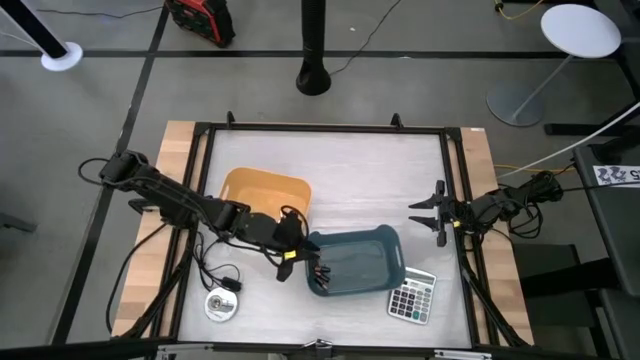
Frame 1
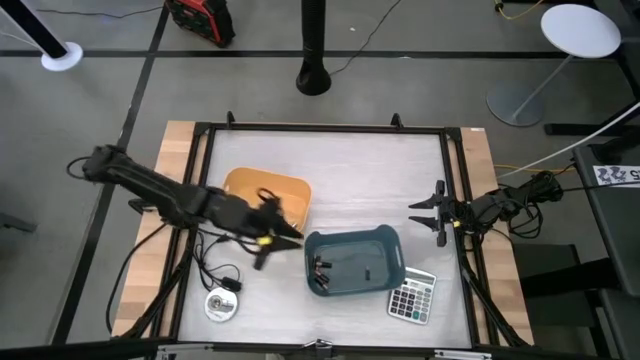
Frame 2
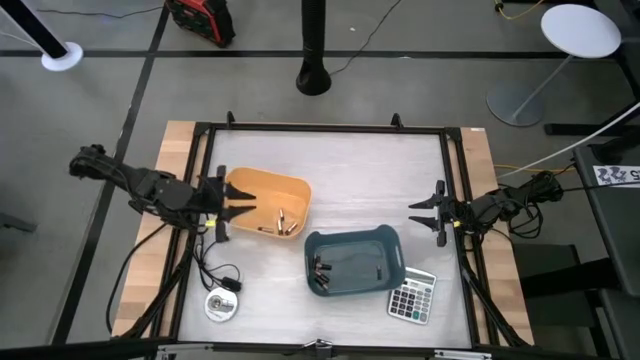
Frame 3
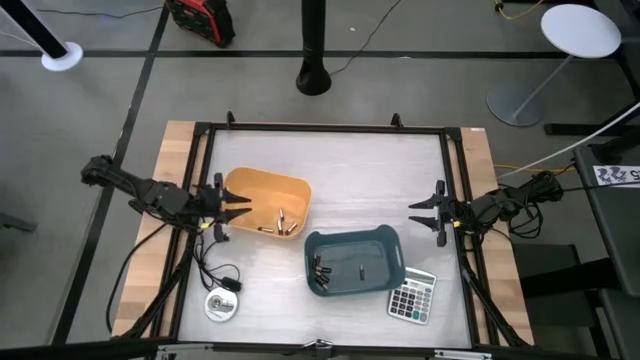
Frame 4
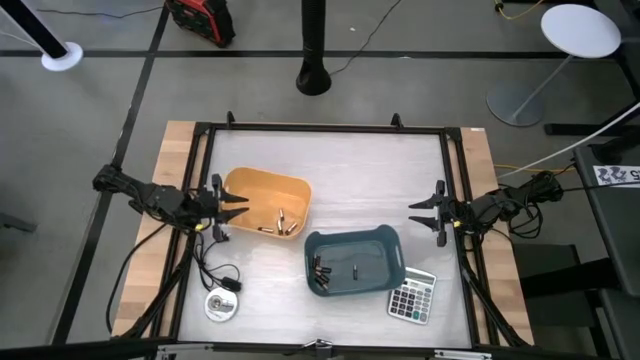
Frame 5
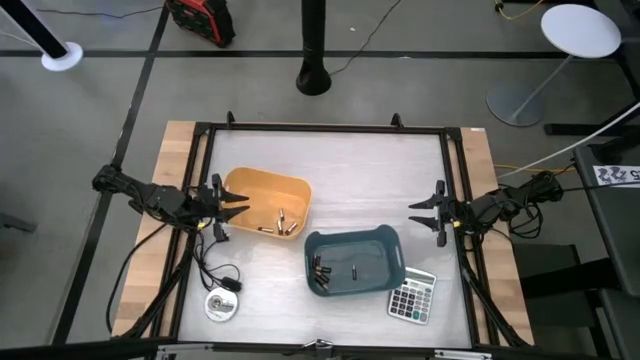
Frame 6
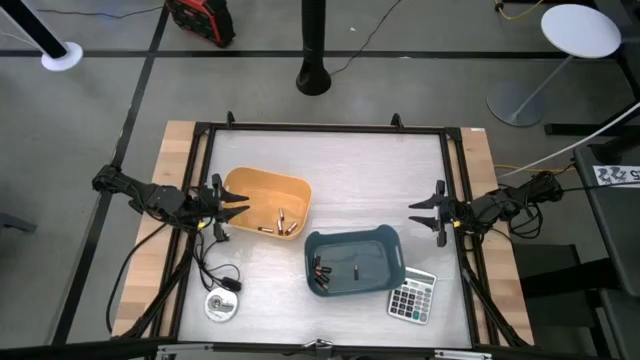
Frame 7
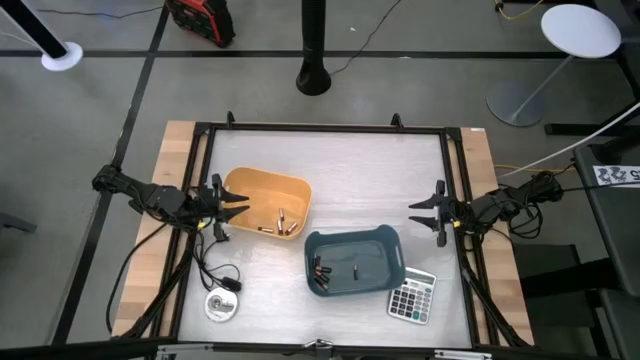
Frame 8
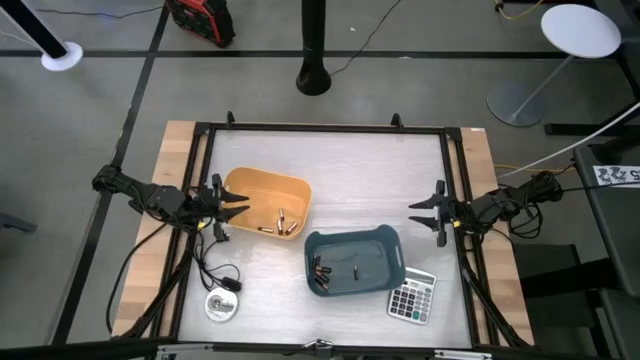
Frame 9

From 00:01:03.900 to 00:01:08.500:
Task: Sort batteries
Return to Home Position

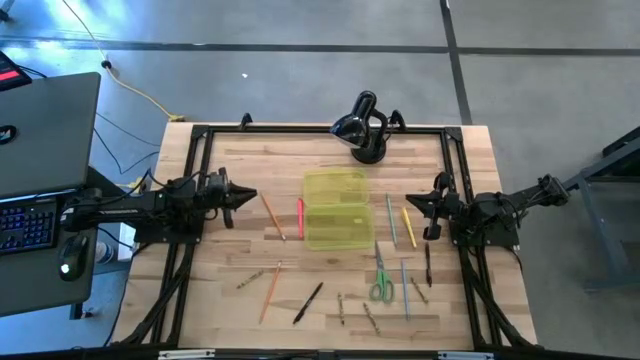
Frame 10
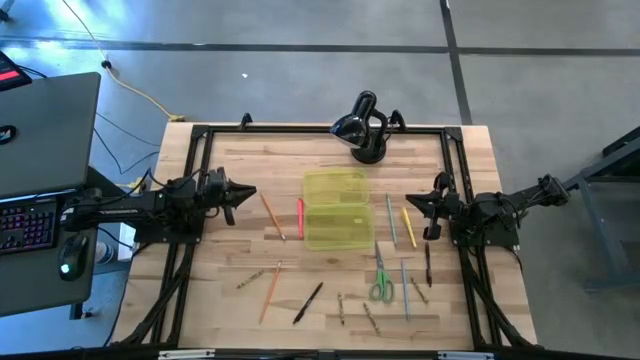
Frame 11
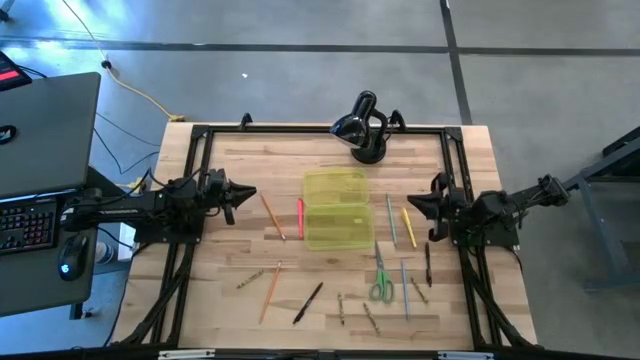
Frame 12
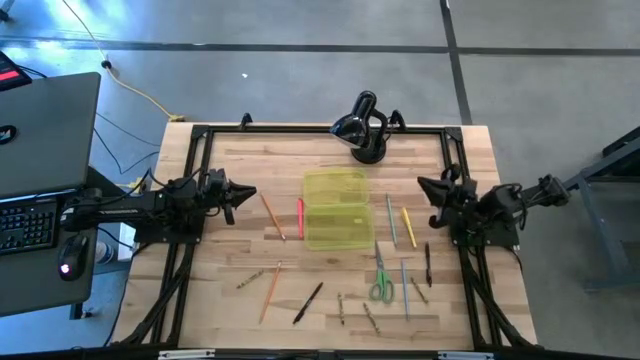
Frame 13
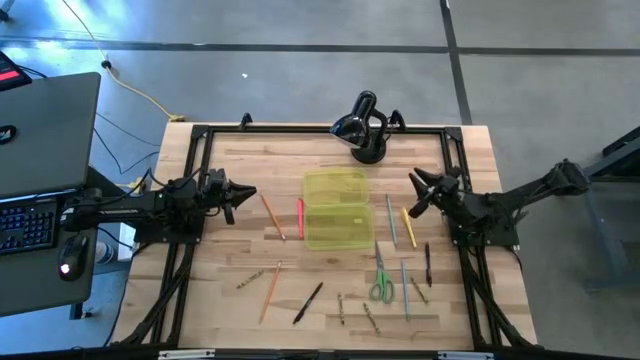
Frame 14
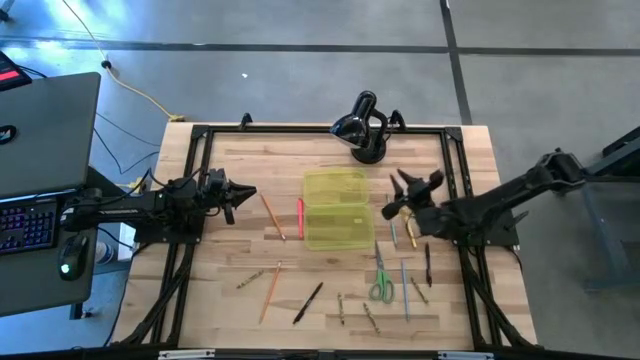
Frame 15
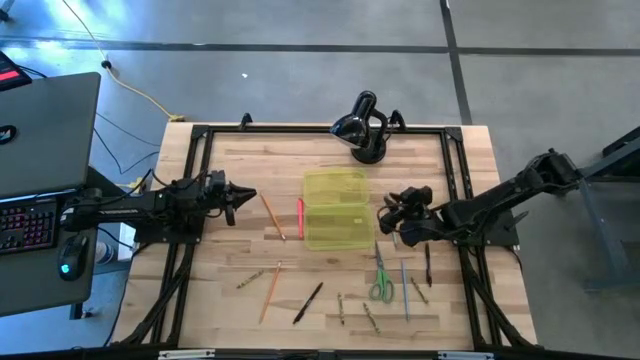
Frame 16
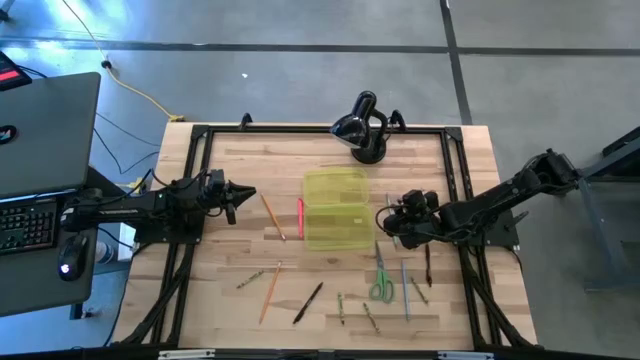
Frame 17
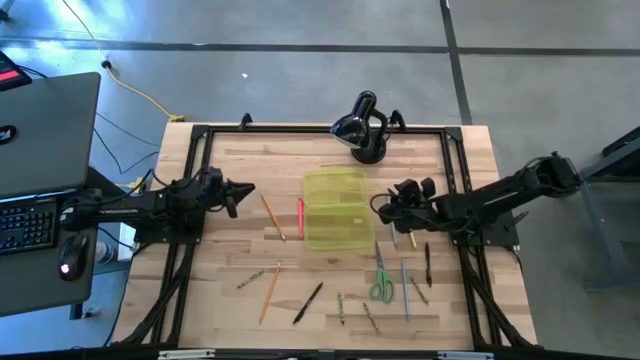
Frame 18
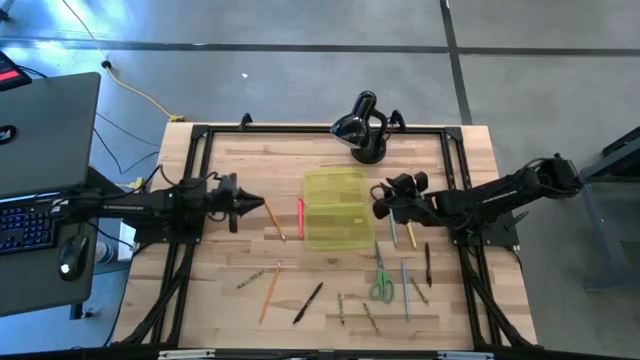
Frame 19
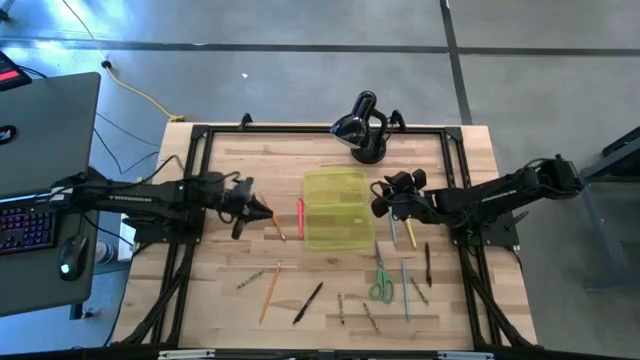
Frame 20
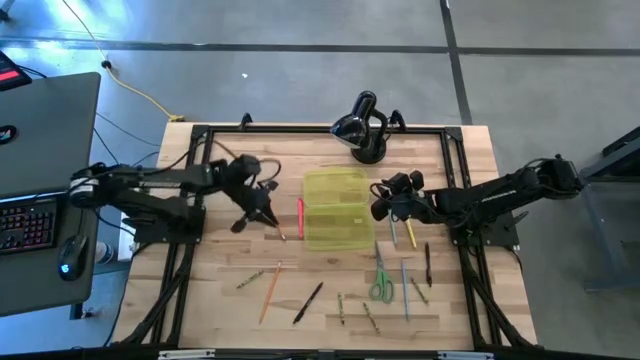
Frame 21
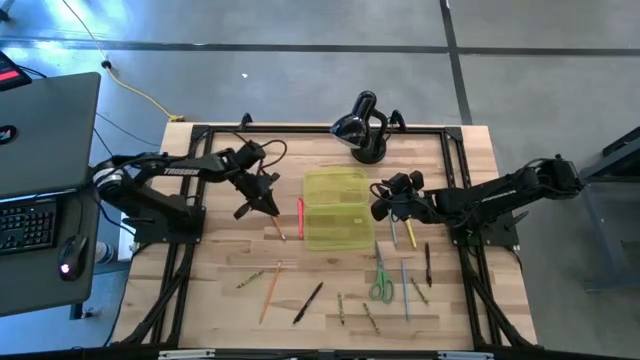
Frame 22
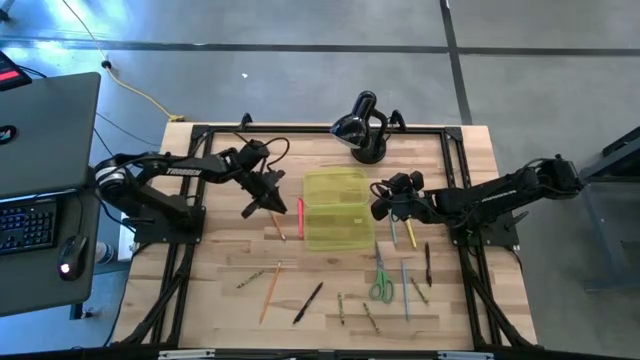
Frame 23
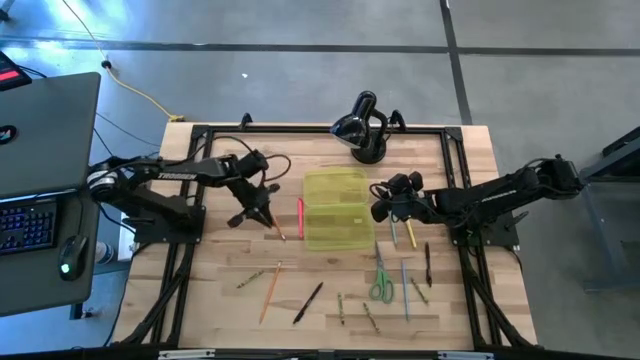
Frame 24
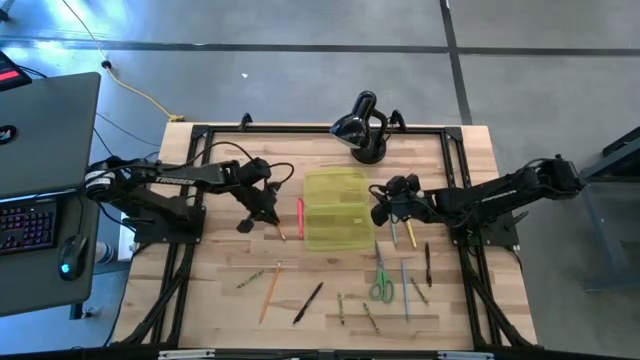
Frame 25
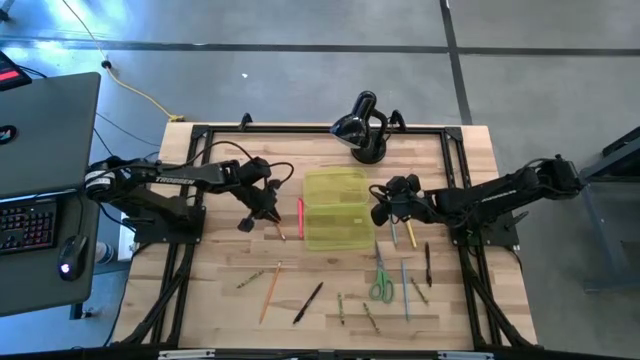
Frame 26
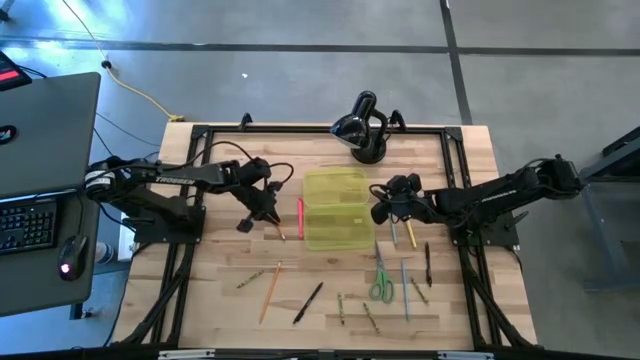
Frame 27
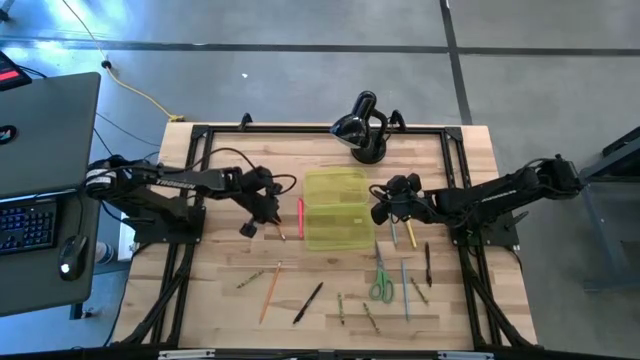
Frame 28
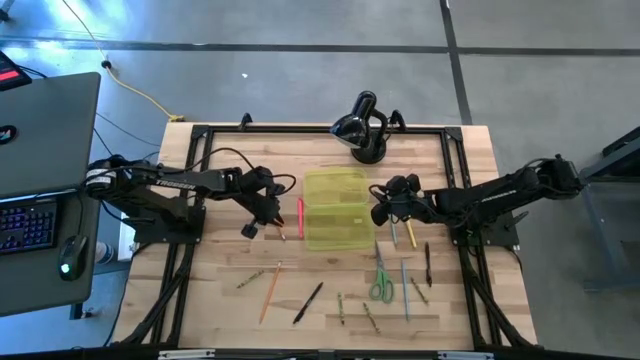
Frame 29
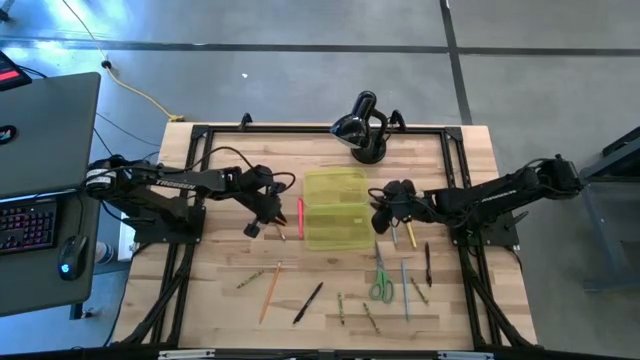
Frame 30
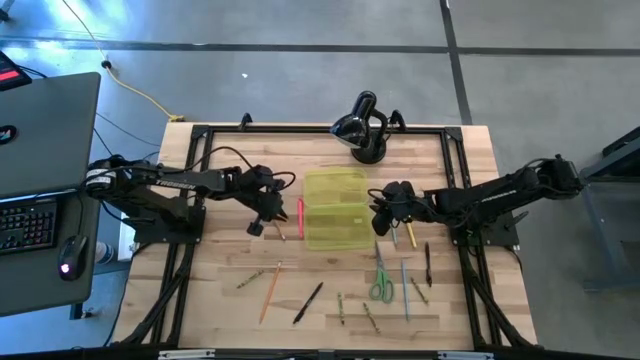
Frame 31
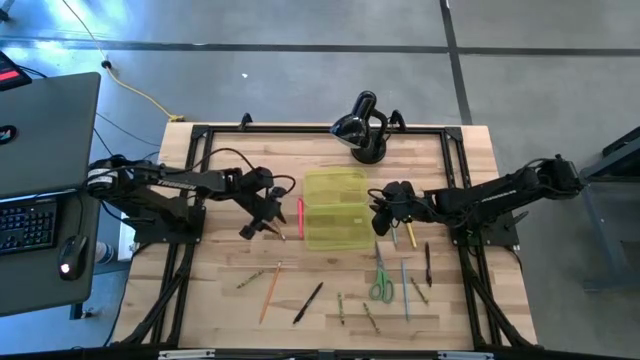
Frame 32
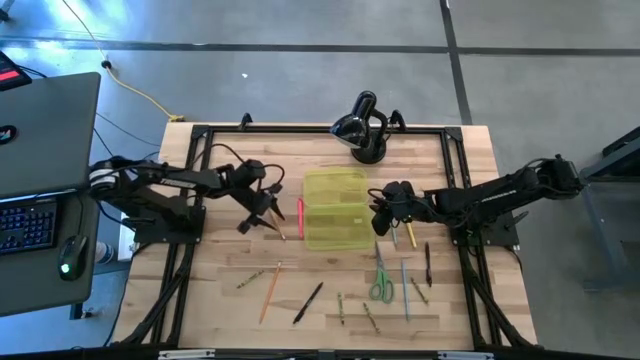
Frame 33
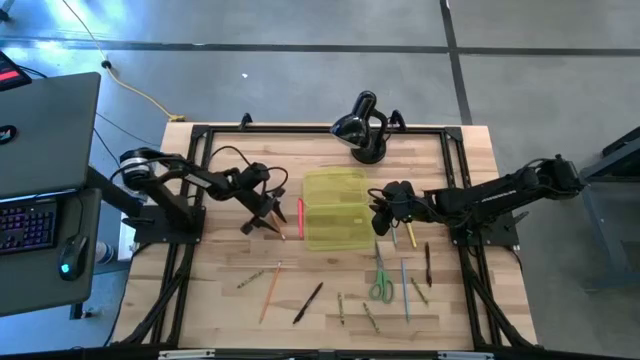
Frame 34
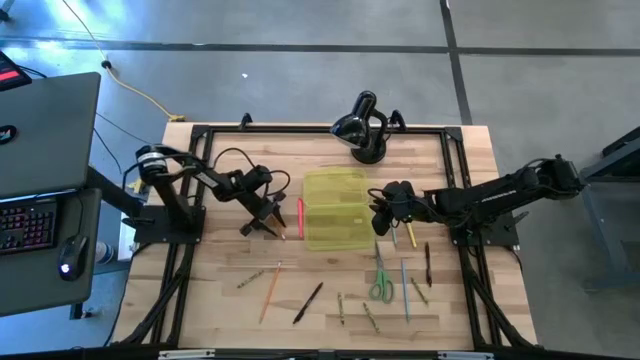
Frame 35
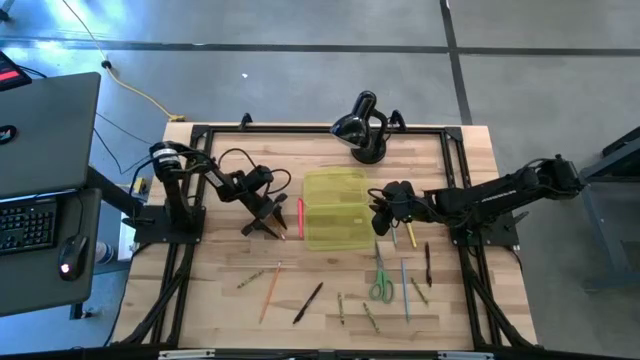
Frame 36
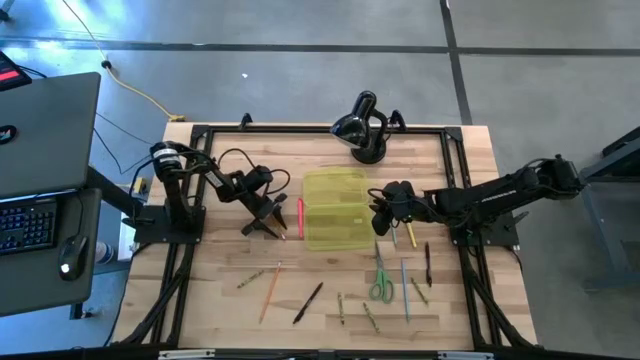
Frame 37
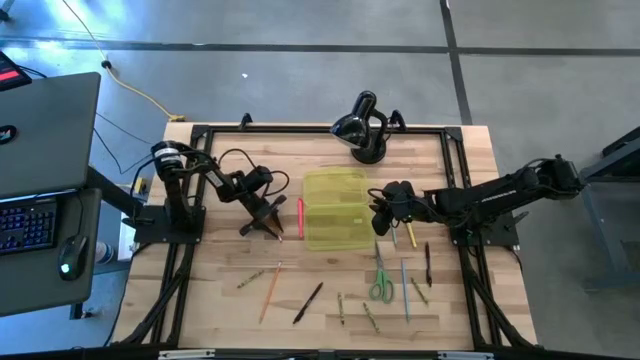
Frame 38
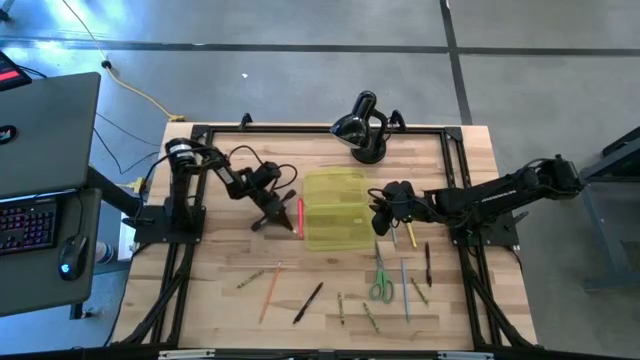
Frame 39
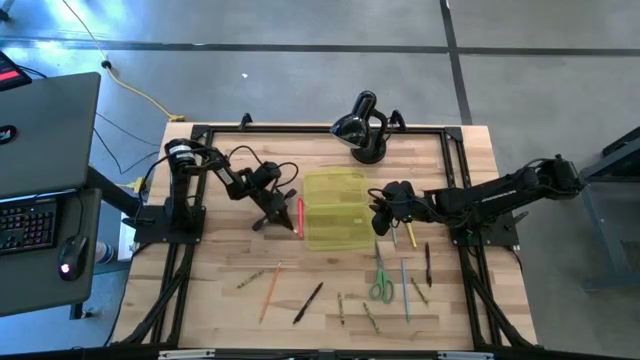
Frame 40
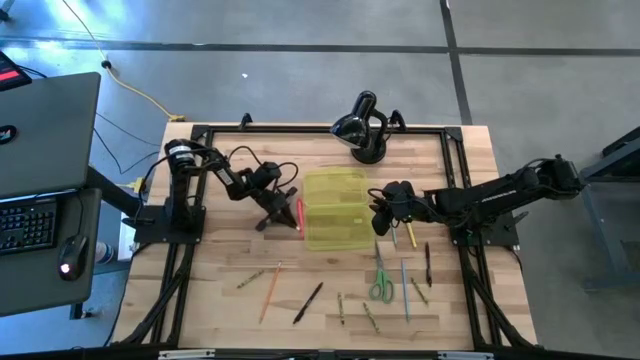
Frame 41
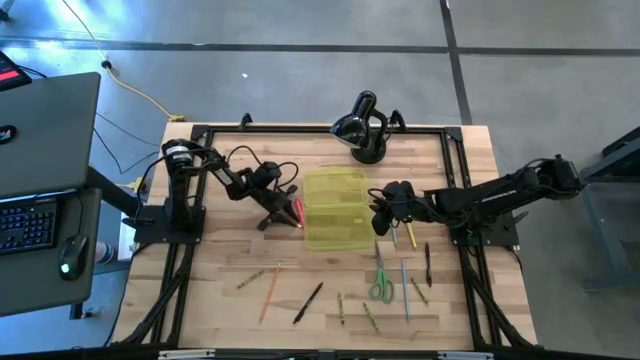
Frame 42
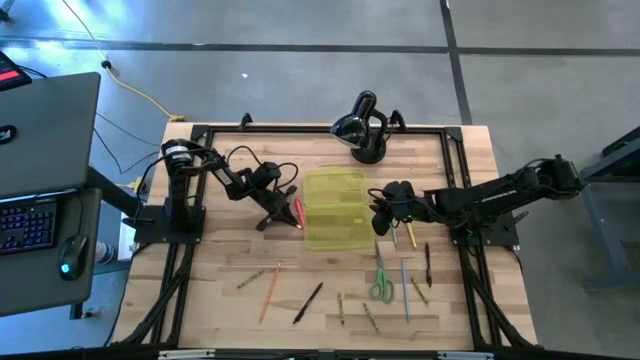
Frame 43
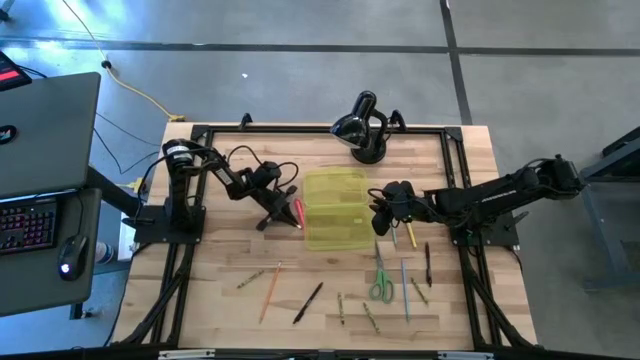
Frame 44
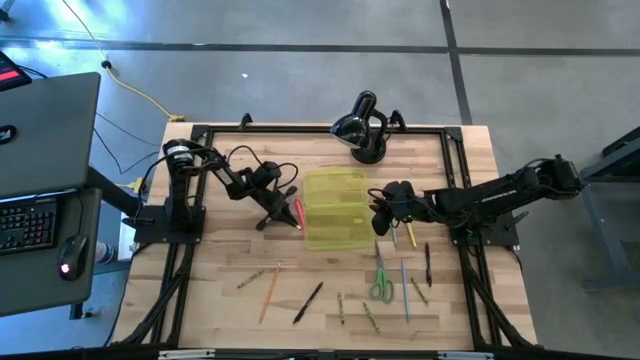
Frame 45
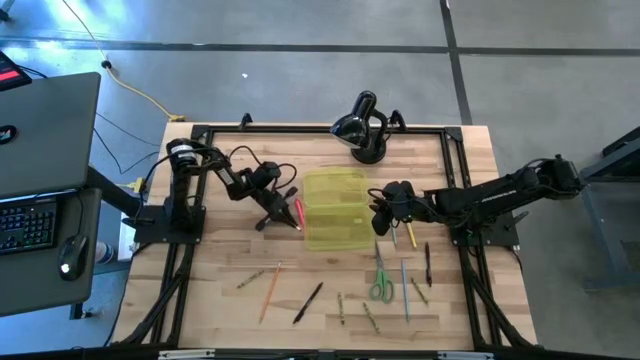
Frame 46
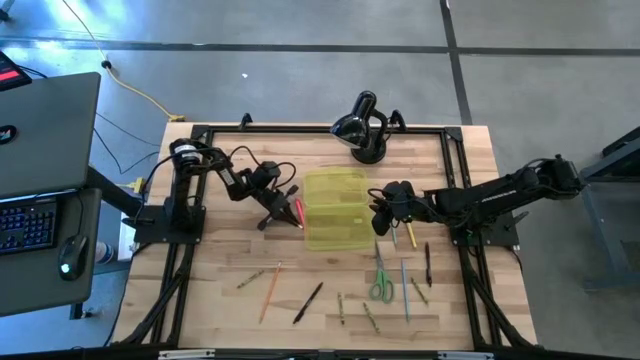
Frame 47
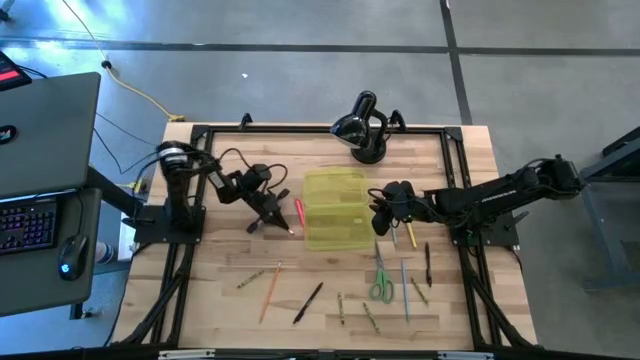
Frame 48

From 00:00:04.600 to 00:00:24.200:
Task: Pick & place school supplies into a supply box
Put the top orange pencil into the yellow school supply box
